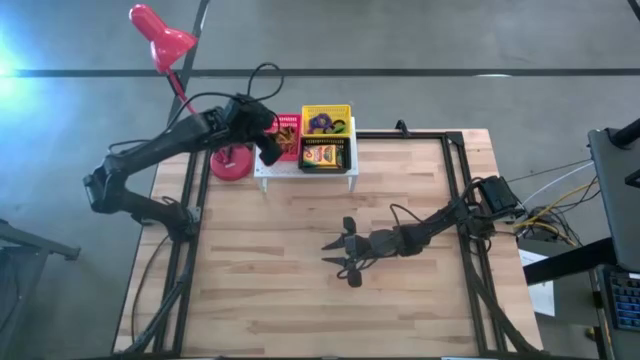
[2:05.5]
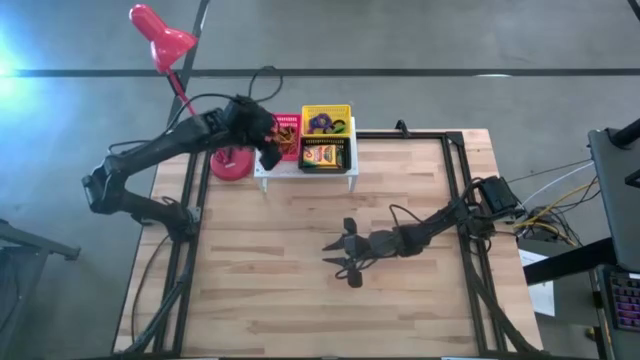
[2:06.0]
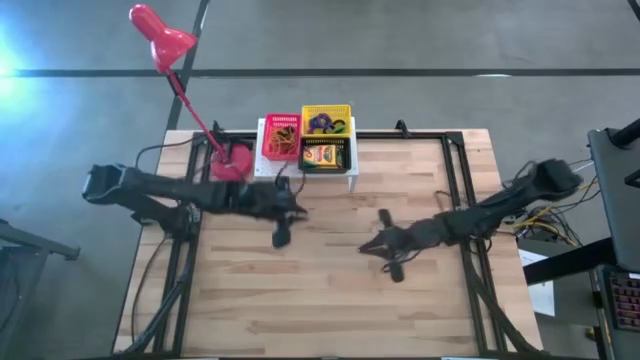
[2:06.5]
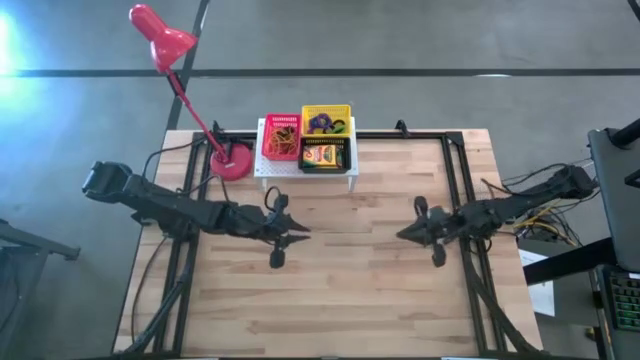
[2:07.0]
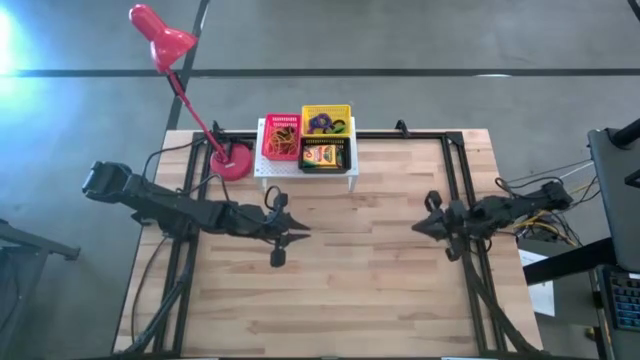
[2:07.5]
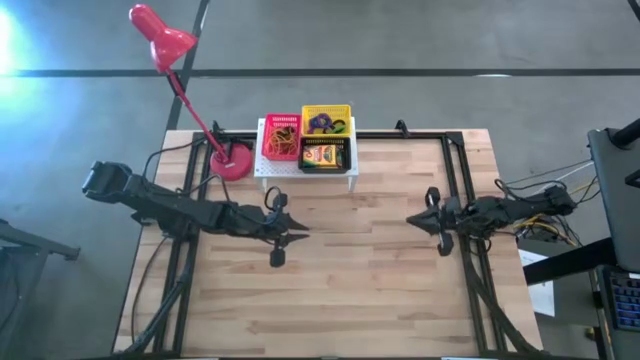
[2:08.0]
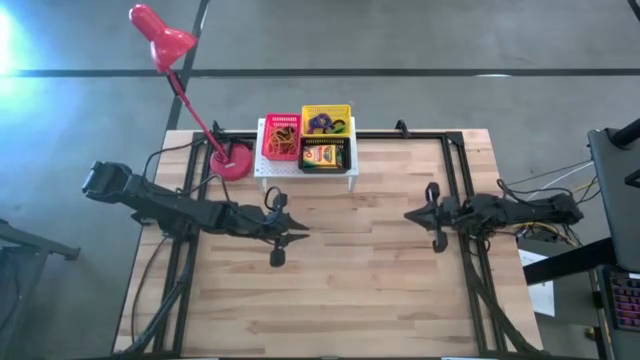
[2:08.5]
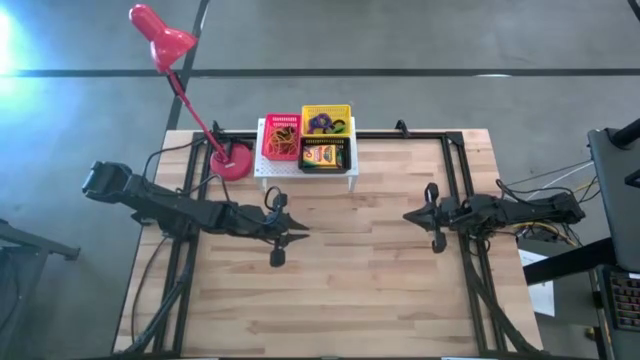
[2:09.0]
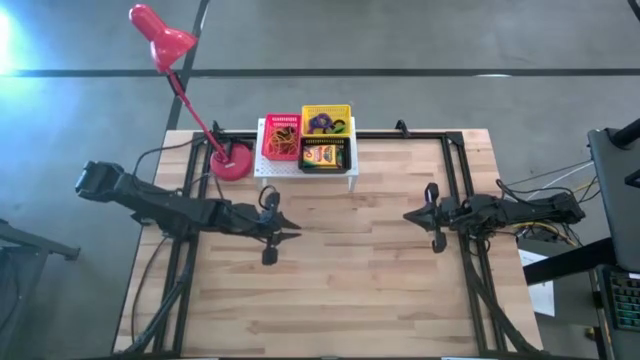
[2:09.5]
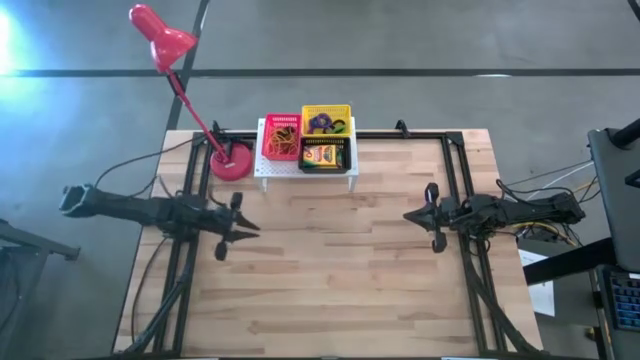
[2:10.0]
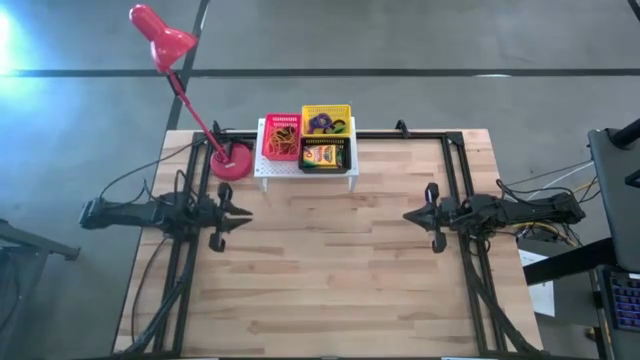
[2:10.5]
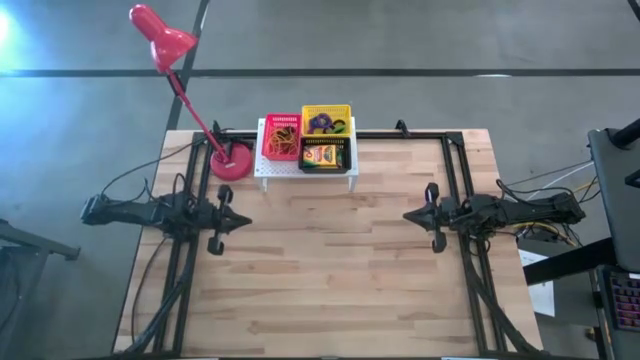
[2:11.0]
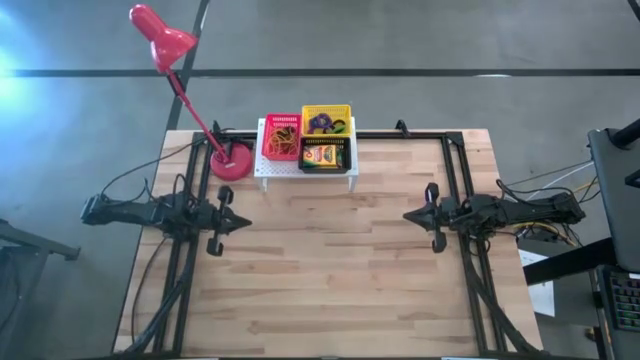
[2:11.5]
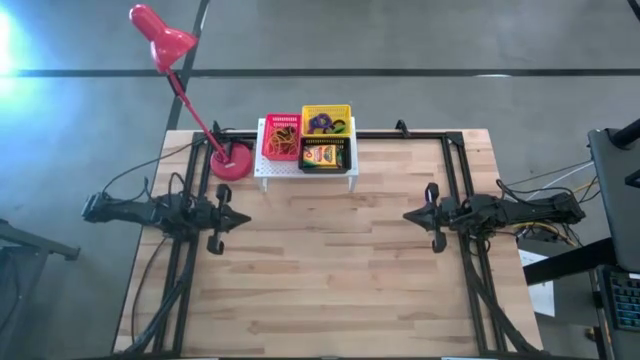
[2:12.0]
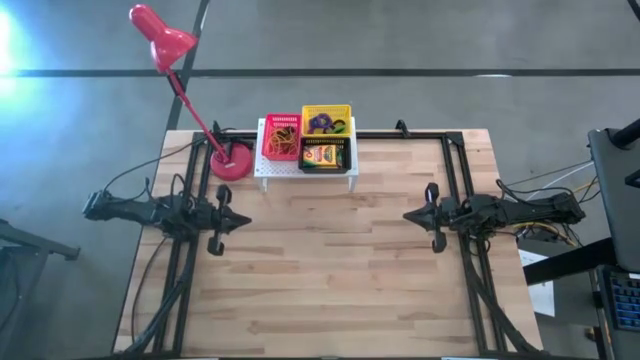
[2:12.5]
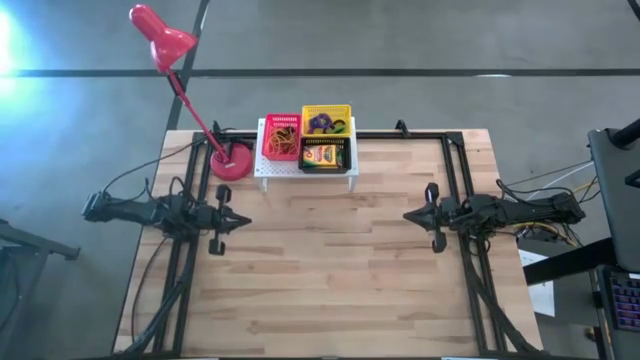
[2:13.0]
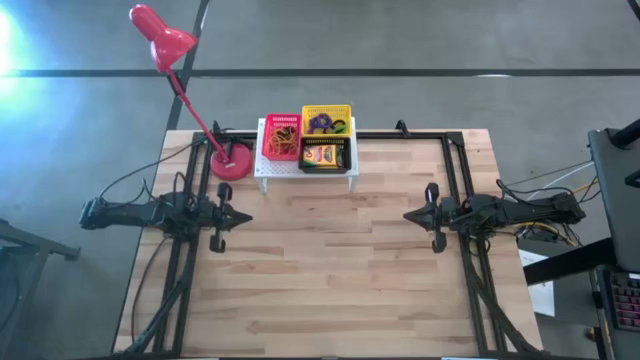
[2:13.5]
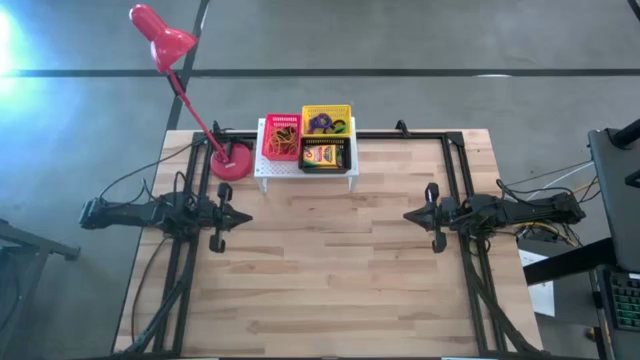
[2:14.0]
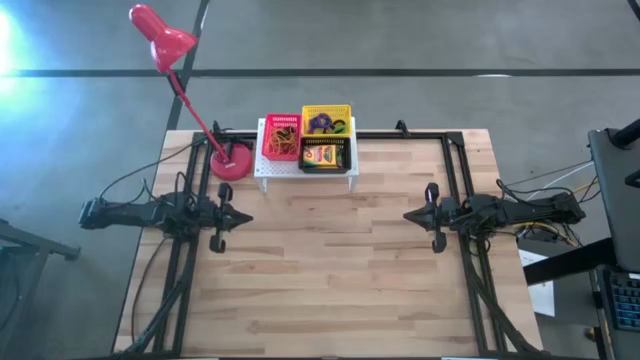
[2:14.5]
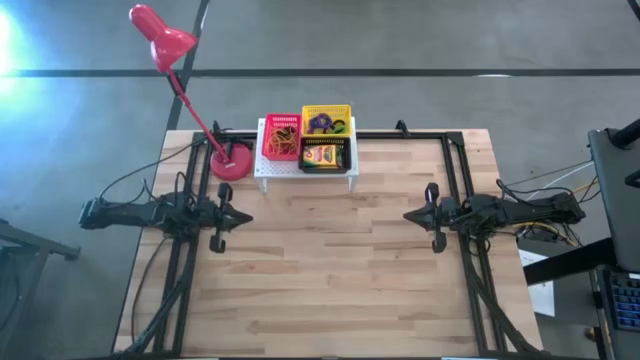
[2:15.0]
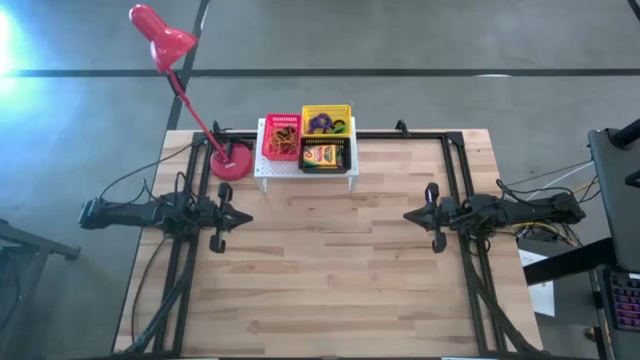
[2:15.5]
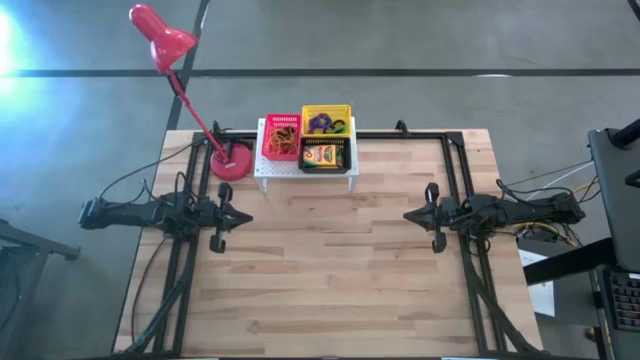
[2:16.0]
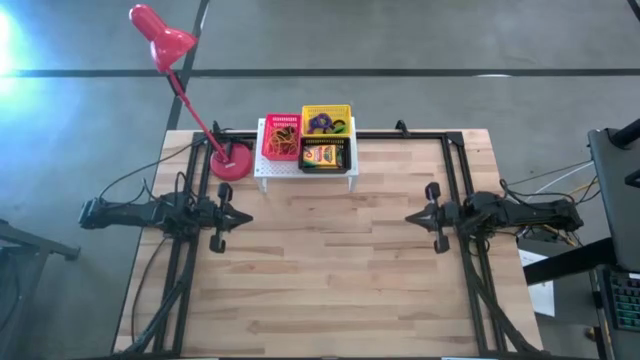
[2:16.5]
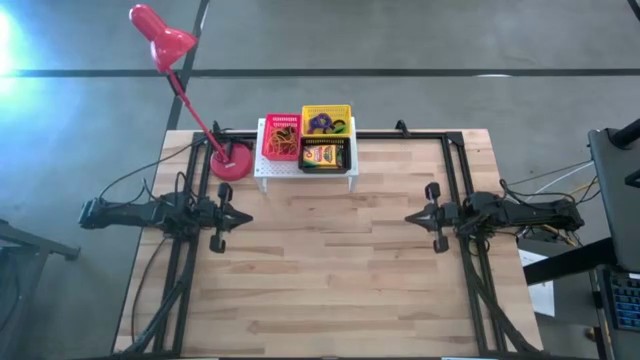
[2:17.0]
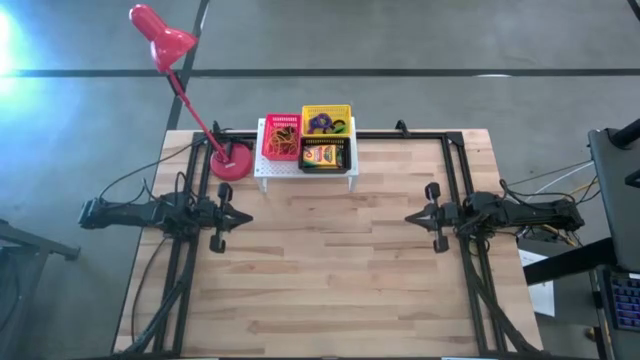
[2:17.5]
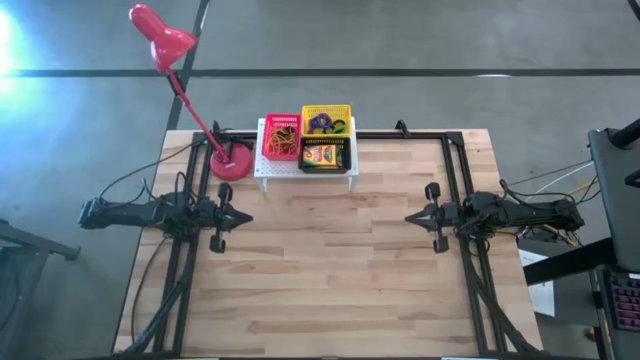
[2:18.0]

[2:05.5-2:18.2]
Task: Pick & Place Office Desk Supplies
Return to Home Position

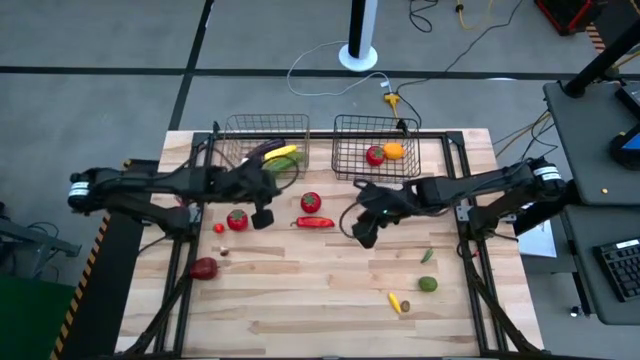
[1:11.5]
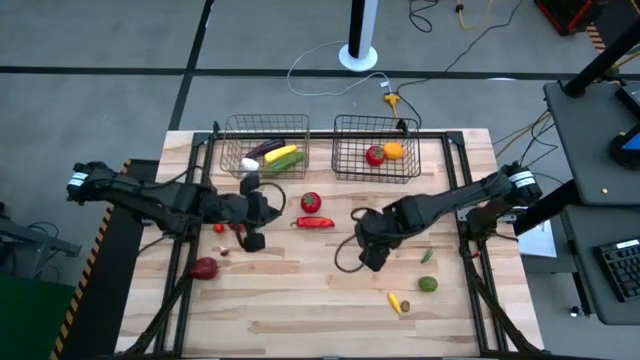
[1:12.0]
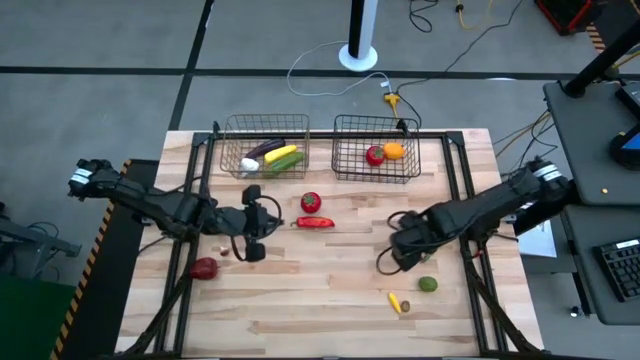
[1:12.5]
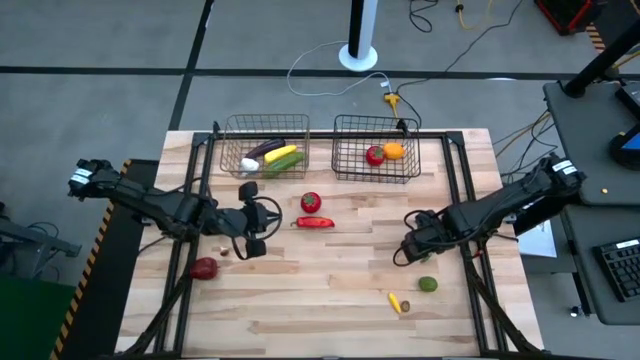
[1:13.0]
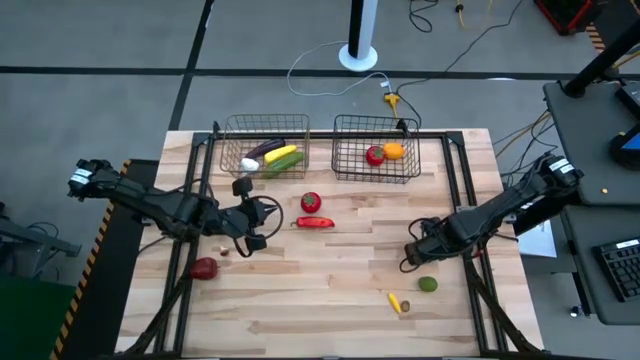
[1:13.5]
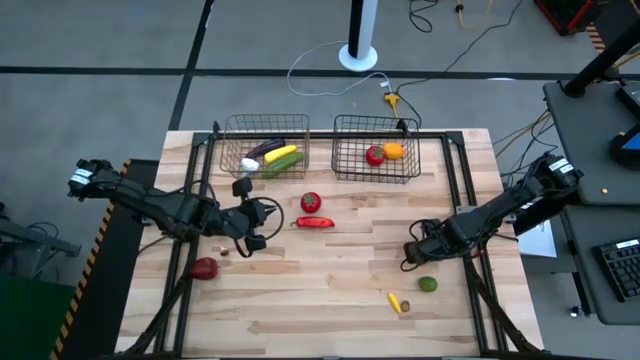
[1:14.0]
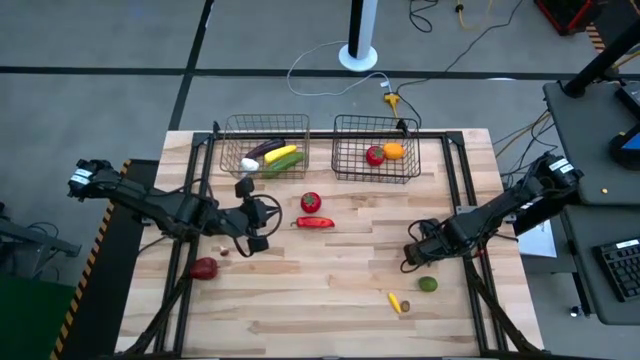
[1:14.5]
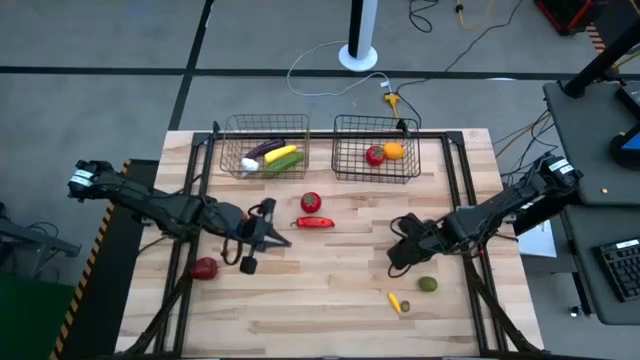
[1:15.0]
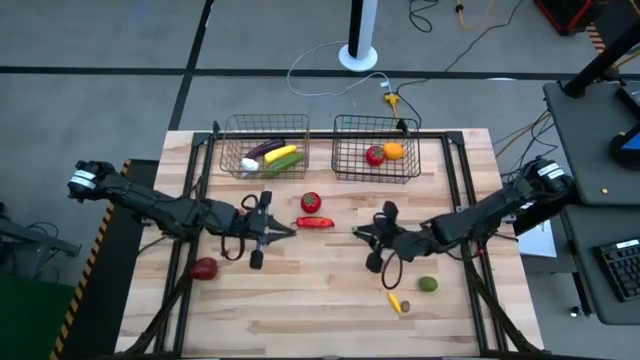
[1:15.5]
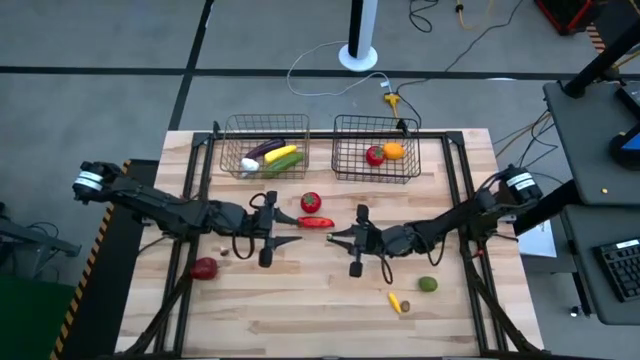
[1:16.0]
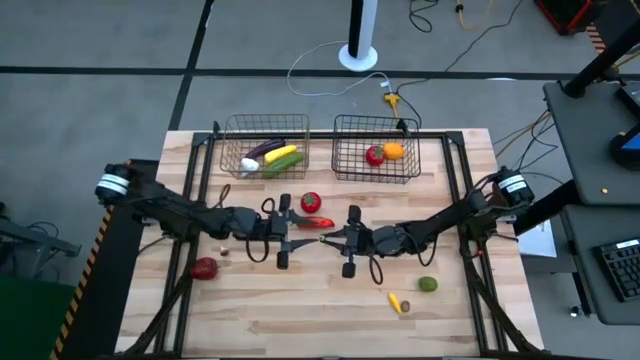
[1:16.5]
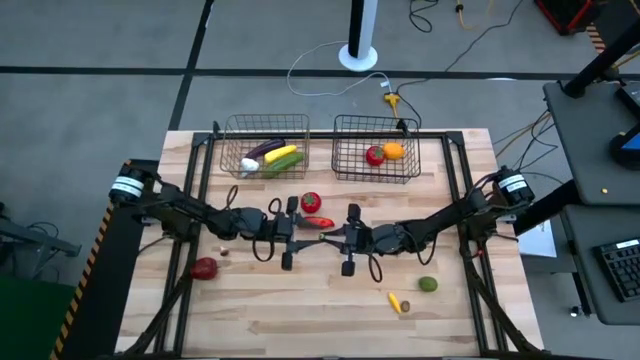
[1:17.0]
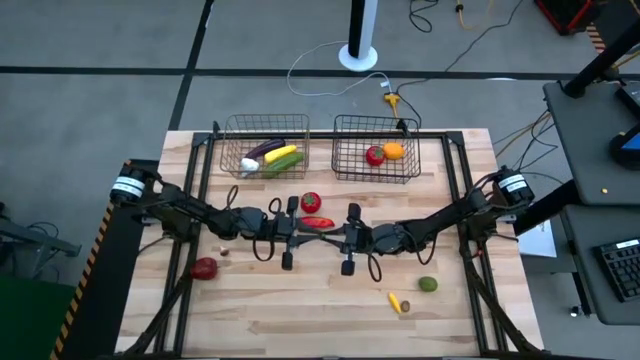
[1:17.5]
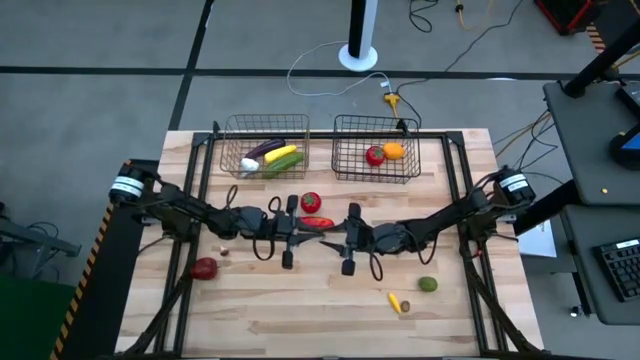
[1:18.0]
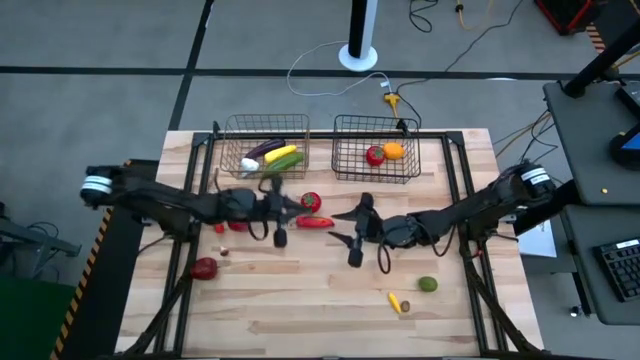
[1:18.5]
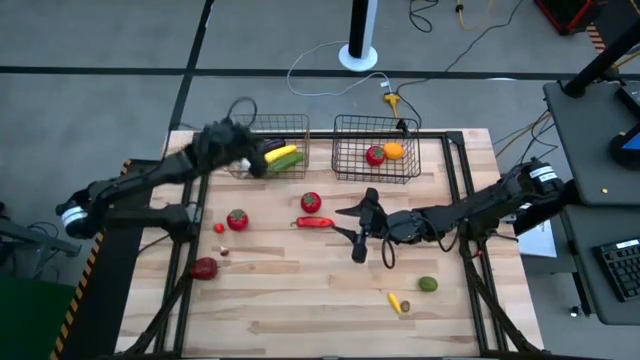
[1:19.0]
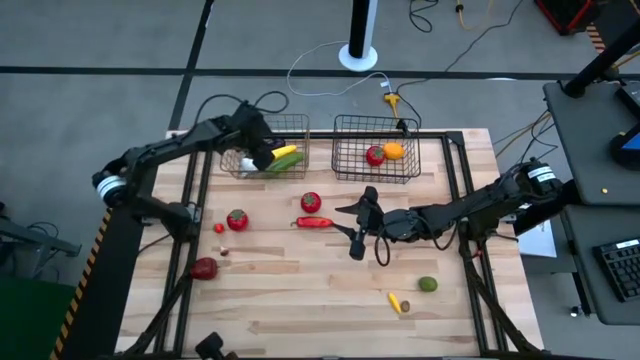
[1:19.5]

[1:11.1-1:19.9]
Task: Sort produce into baskets
Put the green chili pepper into the left wire basket
